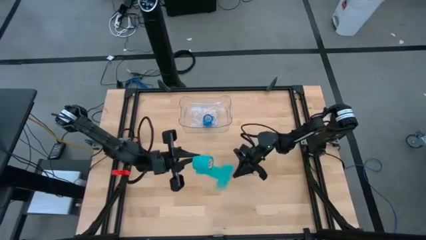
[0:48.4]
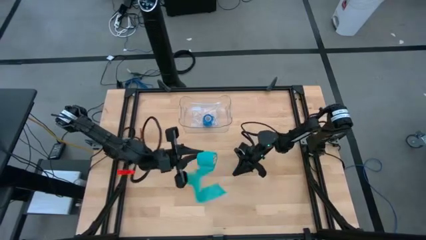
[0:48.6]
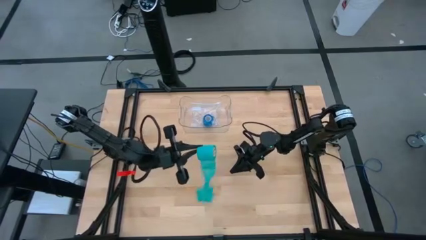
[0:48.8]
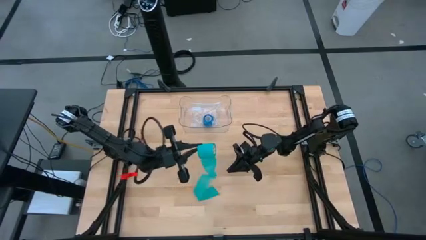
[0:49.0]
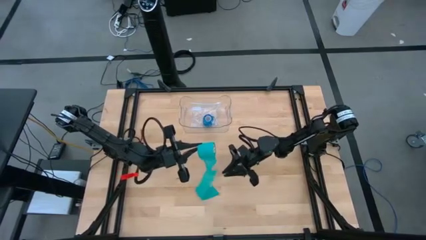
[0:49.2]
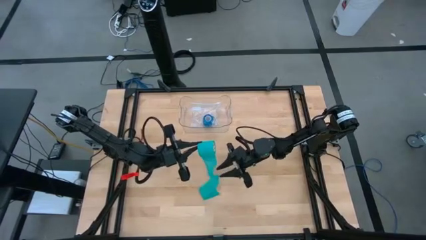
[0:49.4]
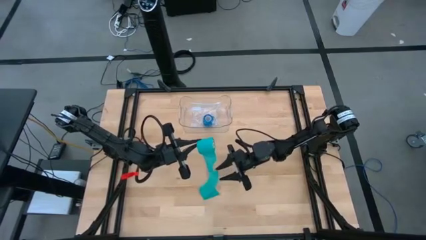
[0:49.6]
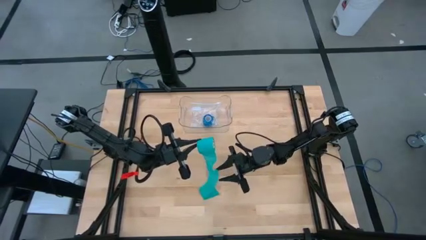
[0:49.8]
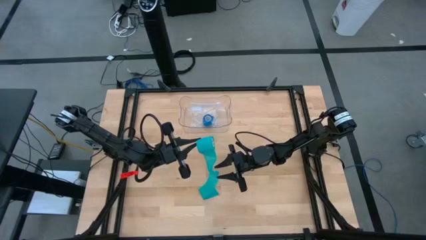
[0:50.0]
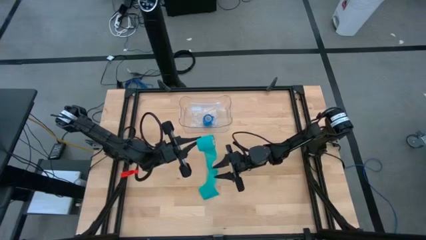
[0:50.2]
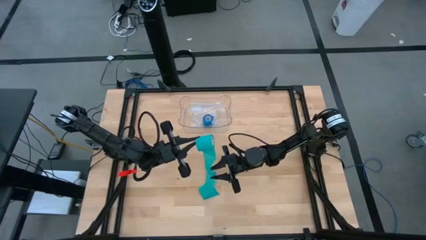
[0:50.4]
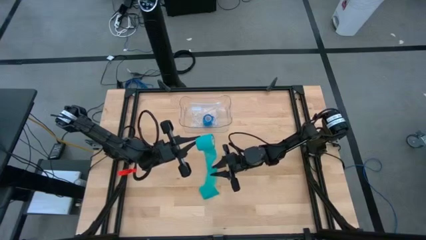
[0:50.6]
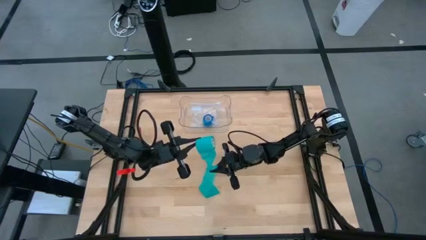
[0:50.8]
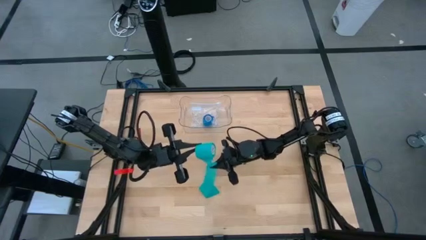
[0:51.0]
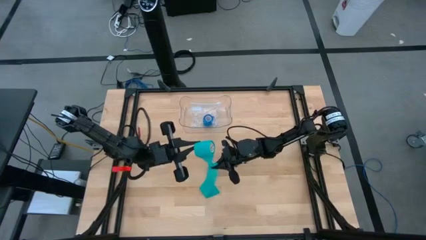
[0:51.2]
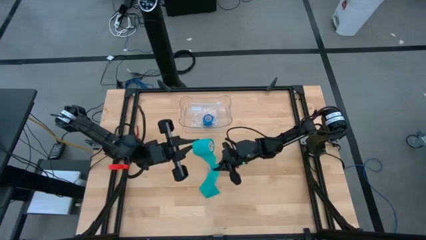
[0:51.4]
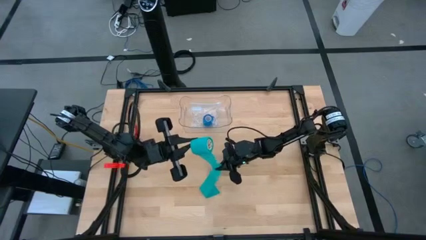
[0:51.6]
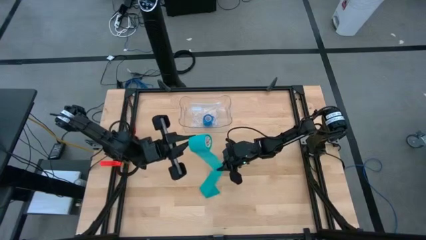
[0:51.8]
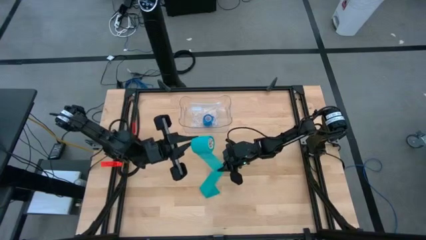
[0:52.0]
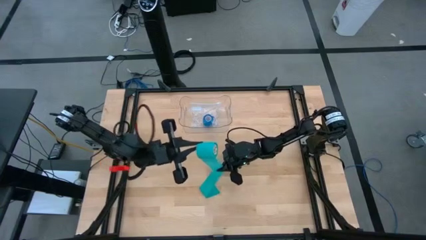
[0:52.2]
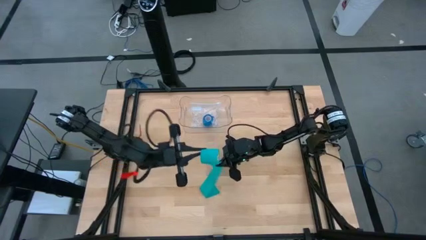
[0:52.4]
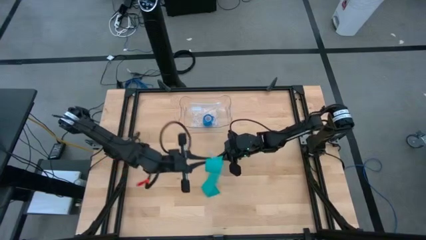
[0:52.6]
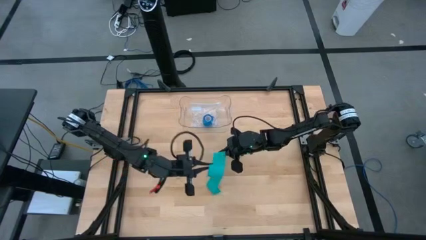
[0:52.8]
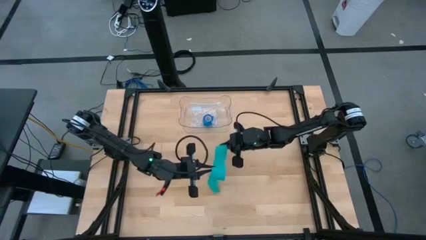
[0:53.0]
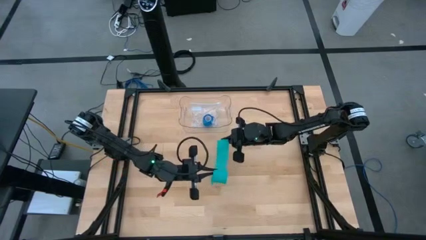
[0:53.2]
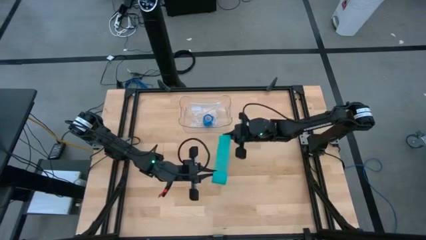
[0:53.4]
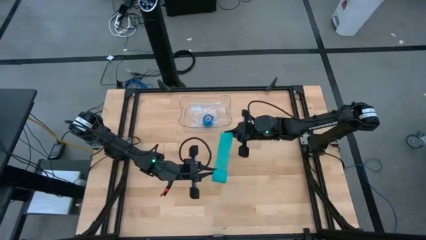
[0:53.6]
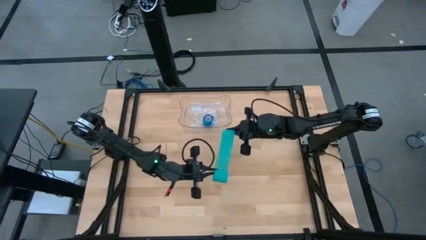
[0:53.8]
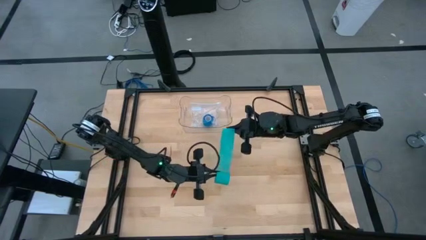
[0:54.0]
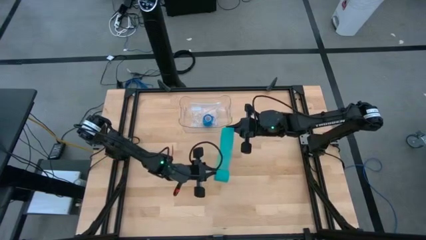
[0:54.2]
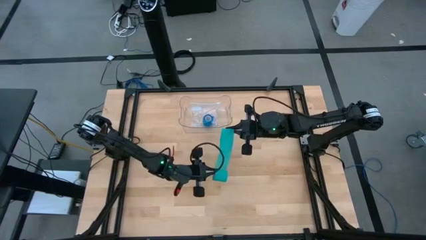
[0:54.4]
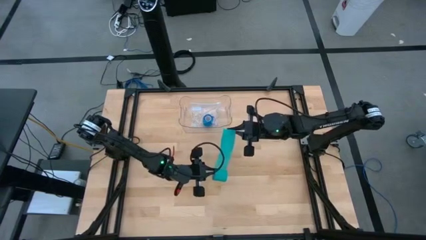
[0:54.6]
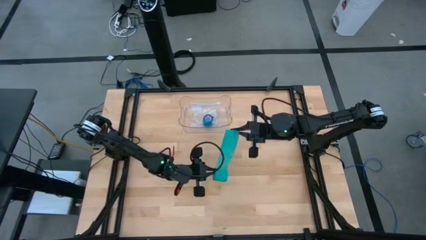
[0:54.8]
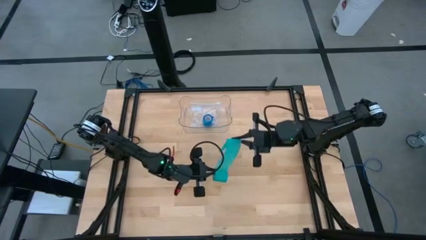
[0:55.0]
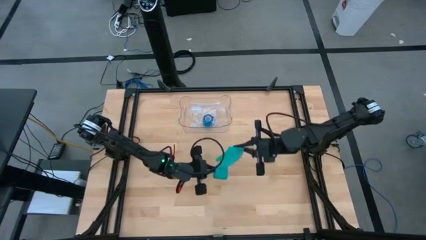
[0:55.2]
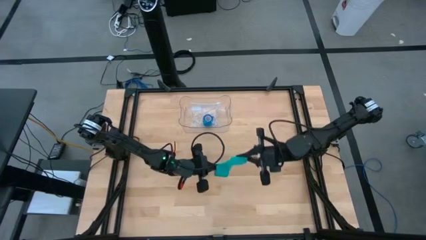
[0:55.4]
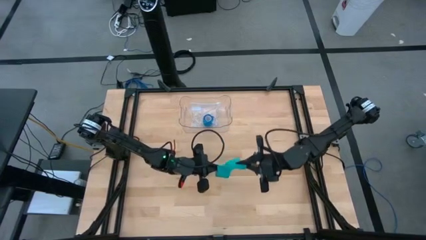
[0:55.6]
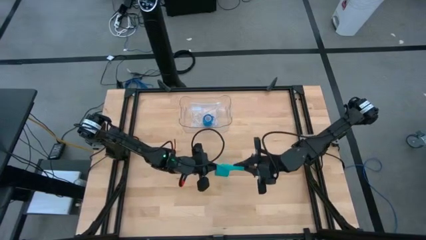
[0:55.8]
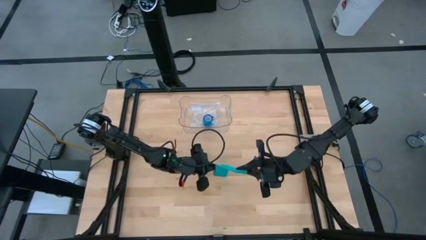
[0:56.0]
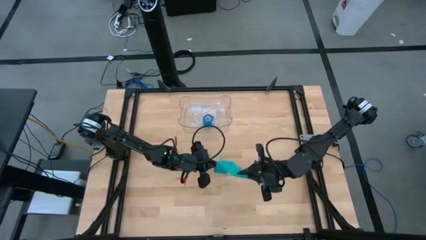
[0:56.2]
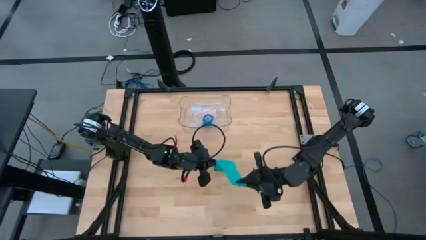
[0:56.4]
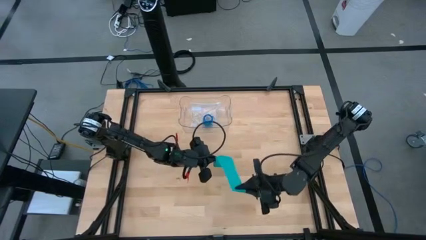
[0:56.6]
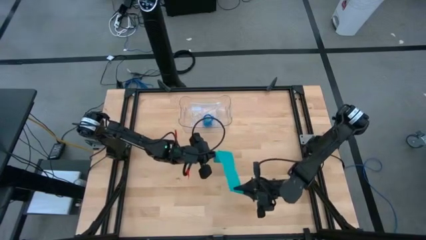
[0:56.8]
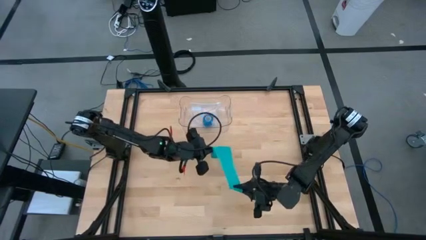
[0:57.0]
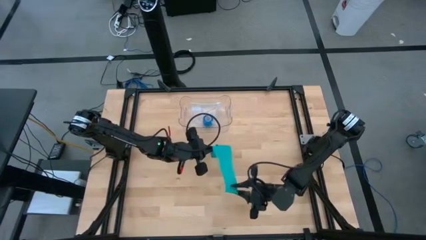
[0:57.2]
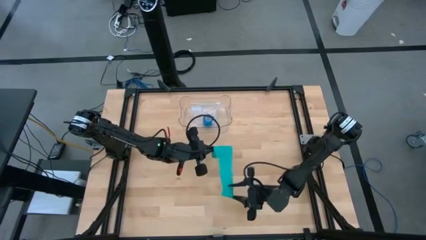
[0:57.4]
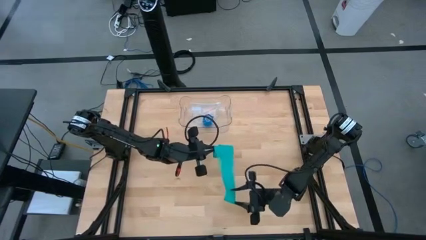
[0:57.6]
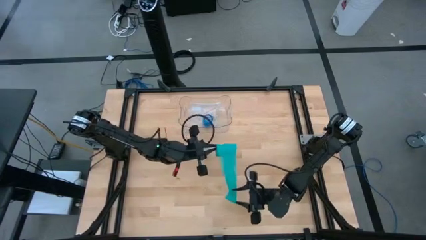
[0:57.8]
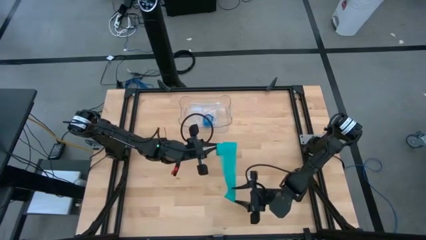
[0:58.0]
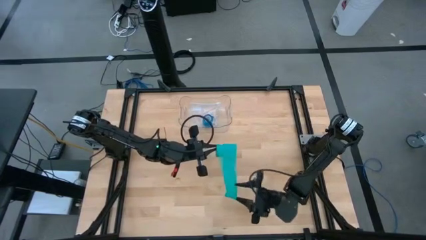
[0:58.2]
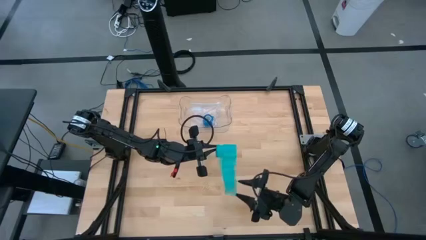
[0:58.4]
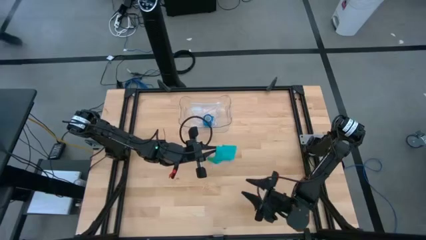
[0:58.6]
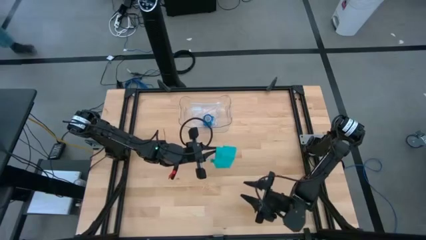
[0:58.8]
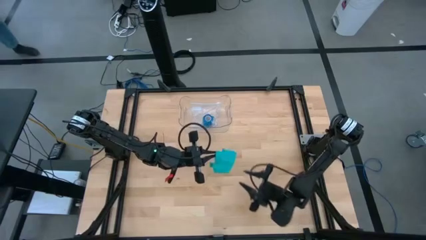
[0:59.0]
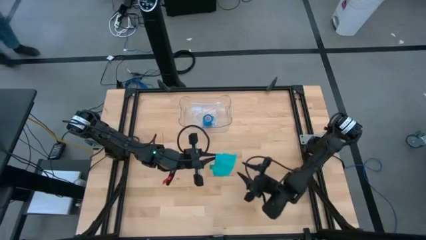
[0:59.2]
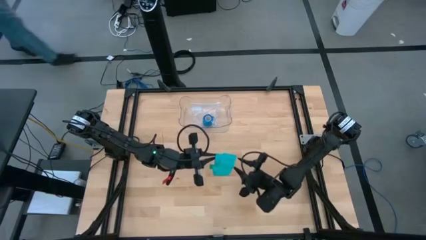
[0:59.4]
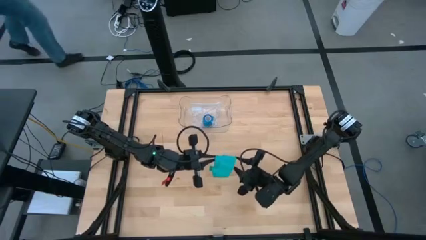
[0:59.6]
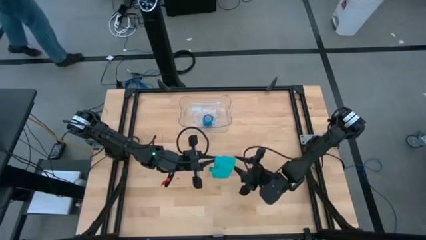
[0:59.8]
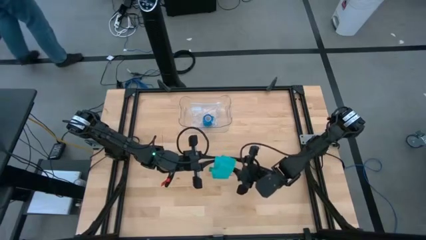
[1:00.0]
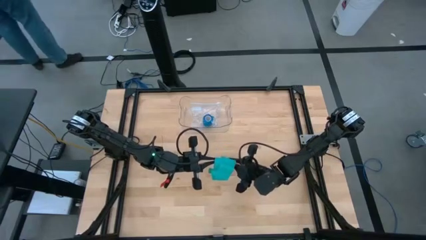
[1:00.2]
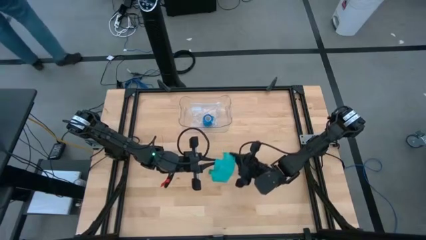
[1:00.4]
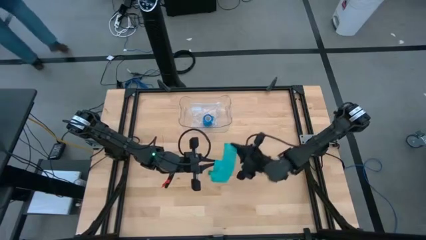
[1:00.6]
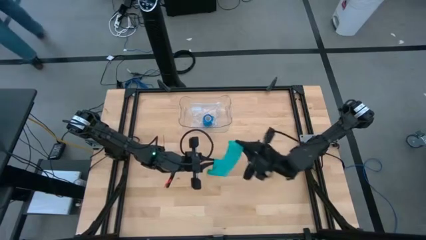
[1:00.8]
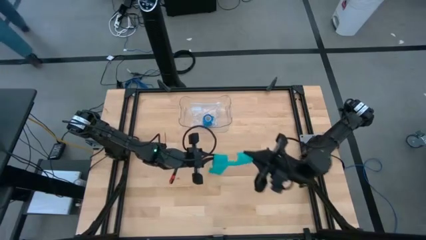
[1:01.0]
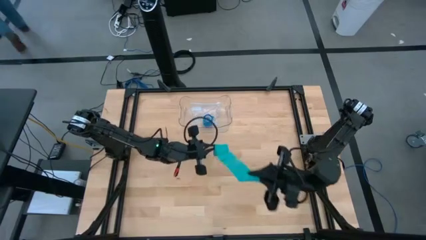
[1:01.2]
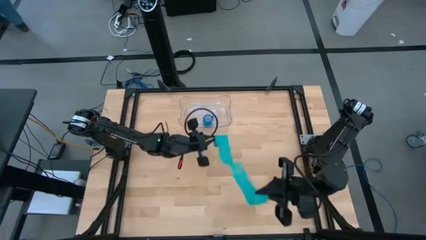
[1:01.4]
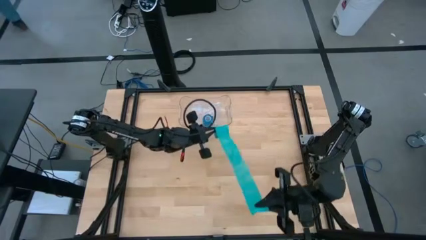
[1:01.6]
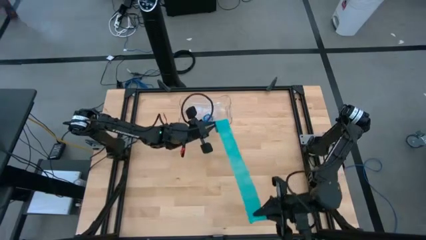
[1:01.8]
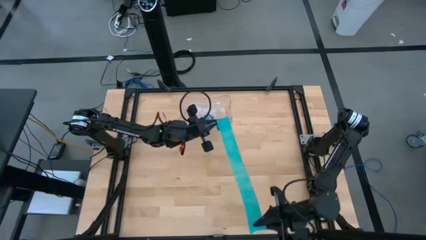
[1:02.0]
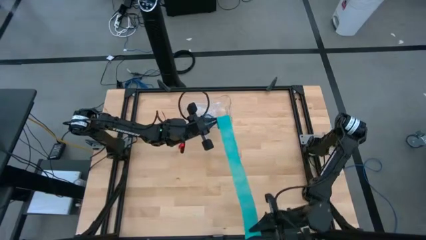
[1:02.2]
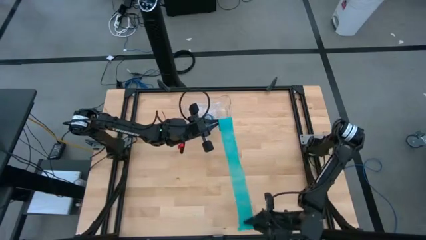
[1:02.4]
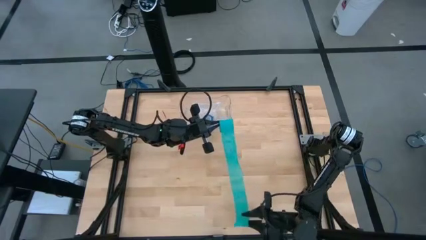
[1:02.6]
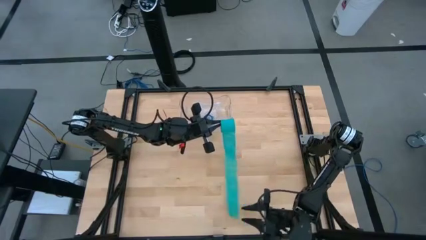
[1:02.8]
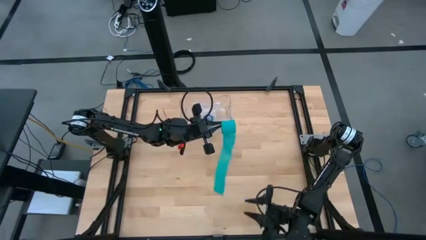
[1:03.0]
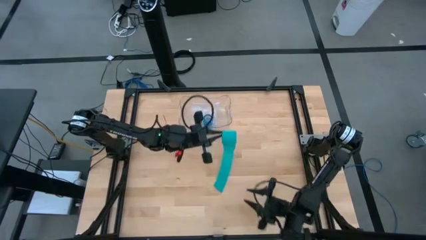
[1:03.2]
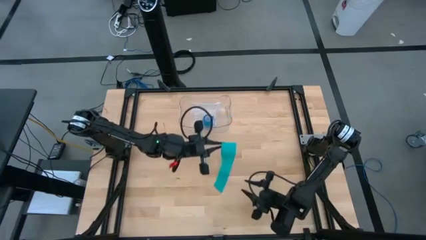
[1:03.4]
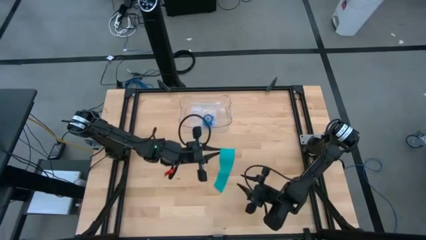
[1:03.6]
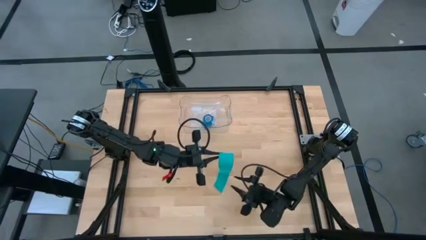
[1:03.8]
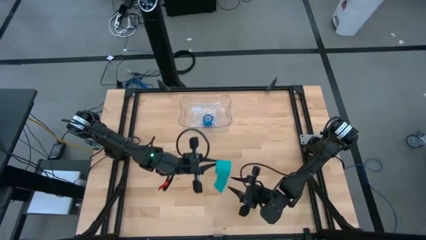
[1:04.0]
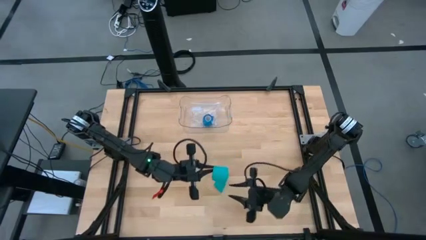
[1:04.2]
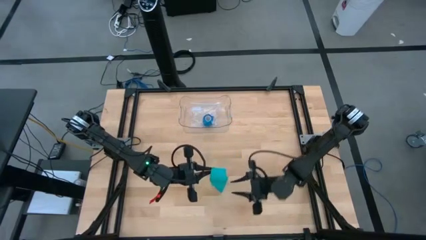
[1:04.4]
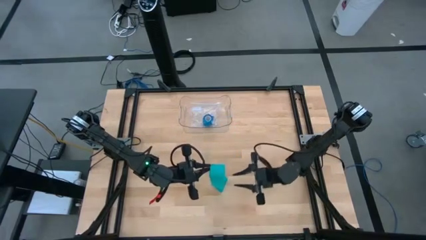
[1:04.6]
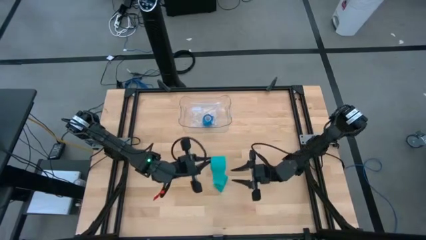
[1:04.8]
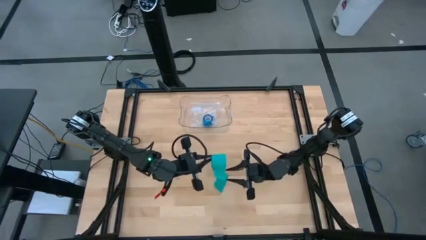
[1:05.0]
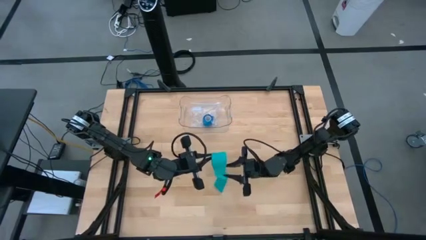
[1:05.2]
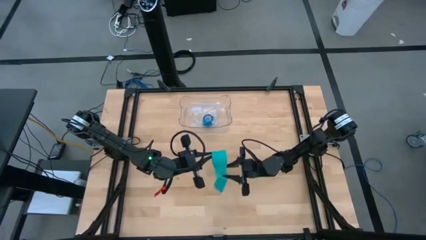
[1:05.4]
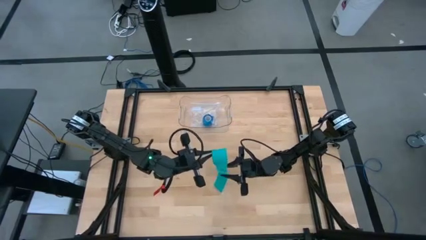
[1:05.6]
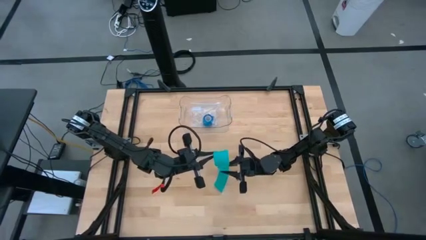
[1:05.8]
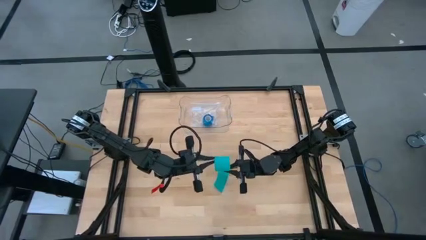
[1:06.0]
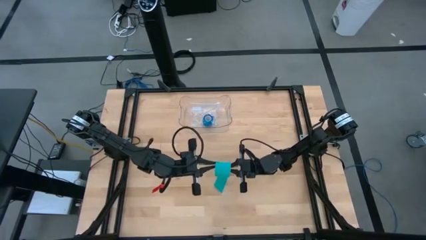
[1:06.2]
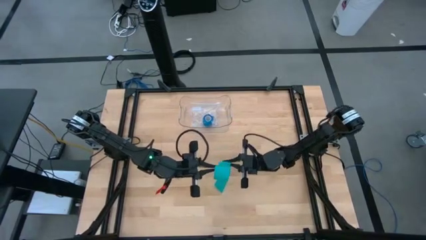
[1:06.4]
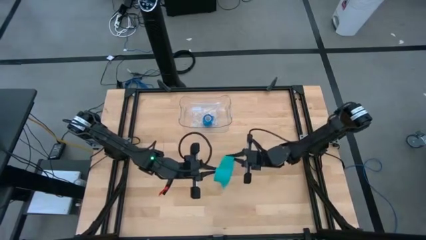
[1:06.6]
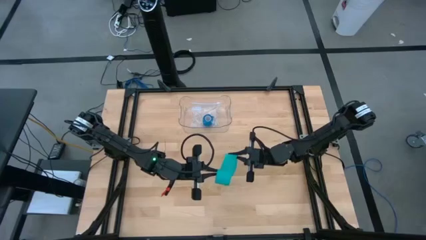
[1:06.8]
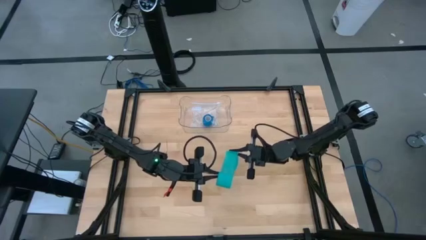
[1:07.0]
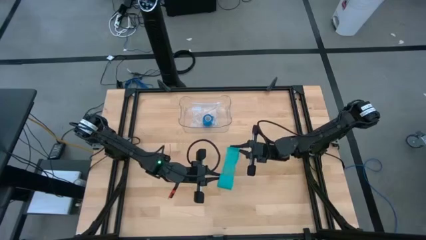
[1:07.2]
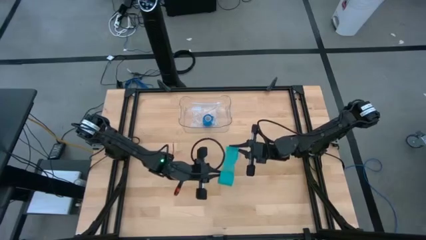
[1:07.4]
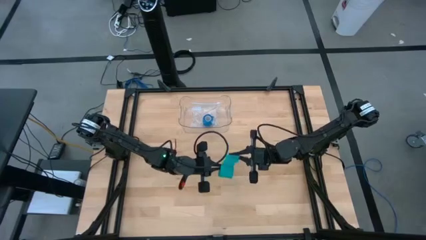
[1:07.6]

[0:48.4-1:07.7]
Task: Roll bandage
Roll the green bandage
